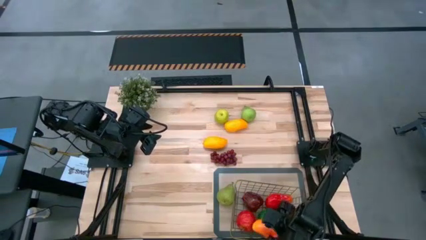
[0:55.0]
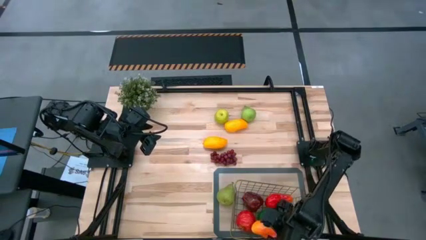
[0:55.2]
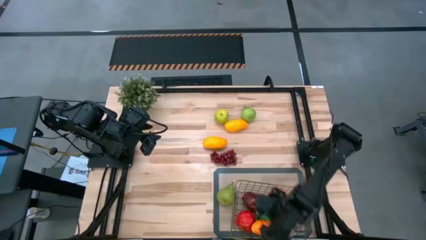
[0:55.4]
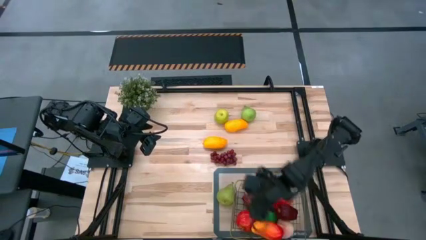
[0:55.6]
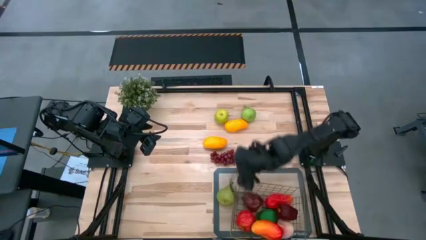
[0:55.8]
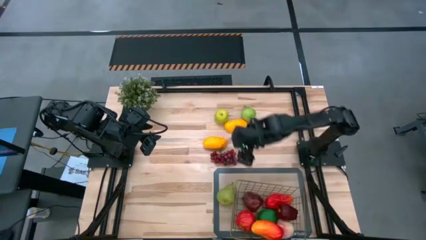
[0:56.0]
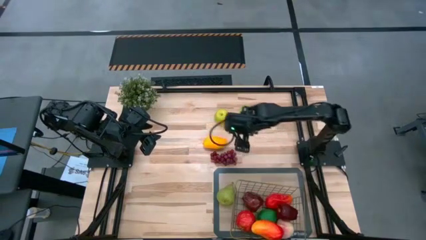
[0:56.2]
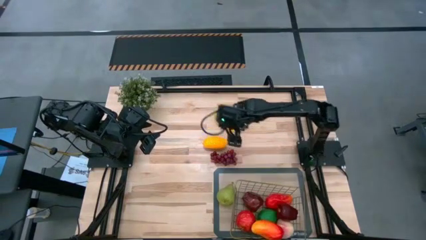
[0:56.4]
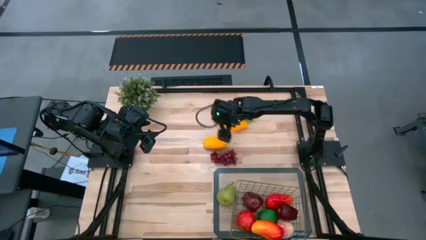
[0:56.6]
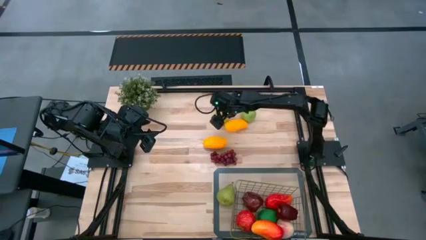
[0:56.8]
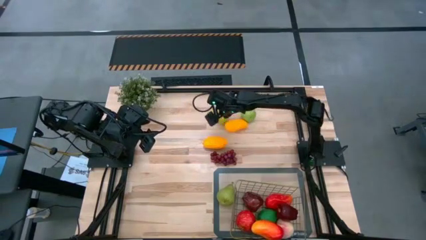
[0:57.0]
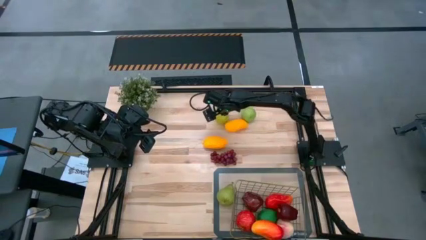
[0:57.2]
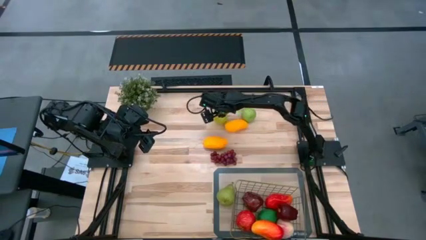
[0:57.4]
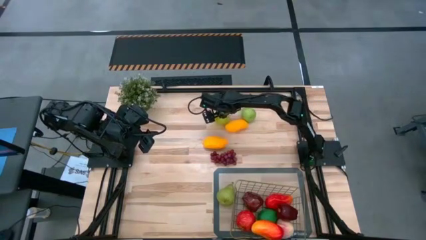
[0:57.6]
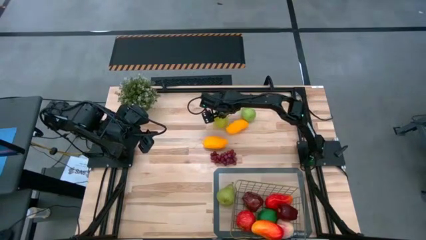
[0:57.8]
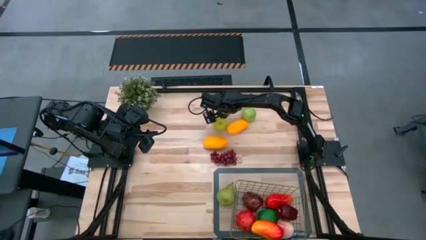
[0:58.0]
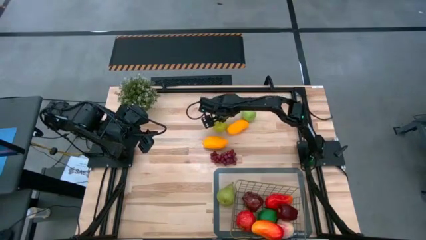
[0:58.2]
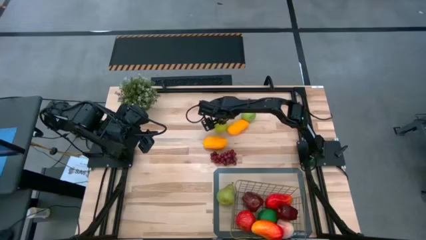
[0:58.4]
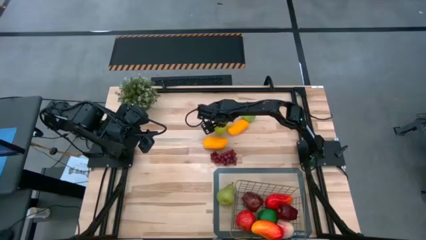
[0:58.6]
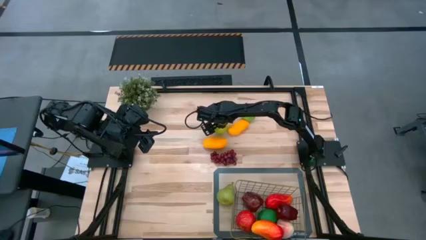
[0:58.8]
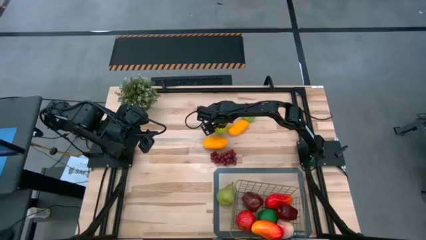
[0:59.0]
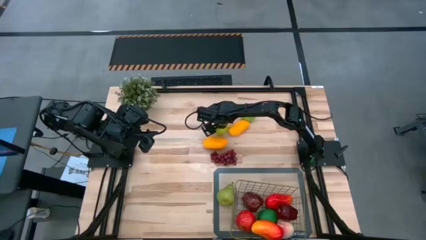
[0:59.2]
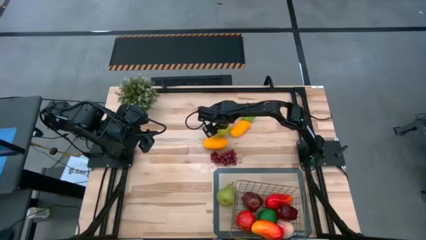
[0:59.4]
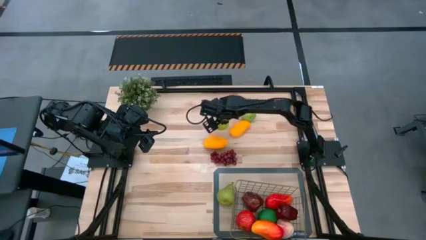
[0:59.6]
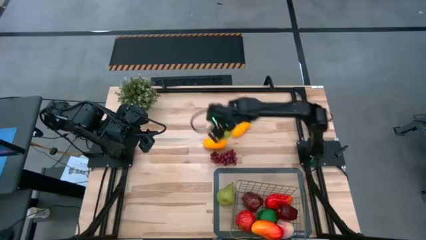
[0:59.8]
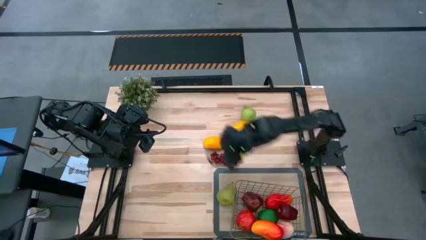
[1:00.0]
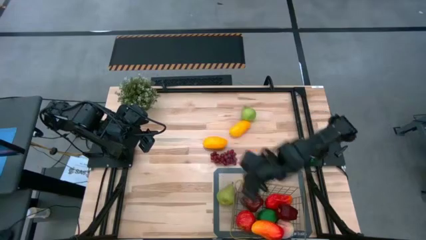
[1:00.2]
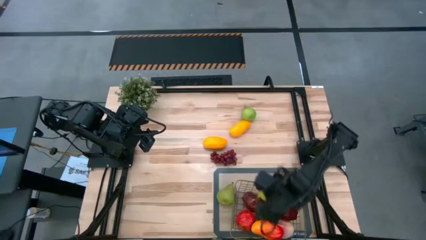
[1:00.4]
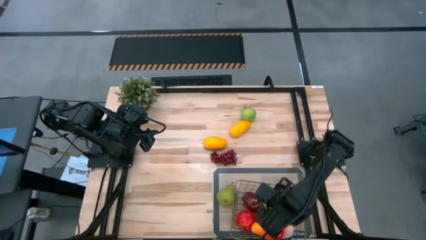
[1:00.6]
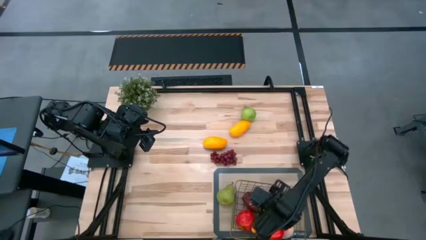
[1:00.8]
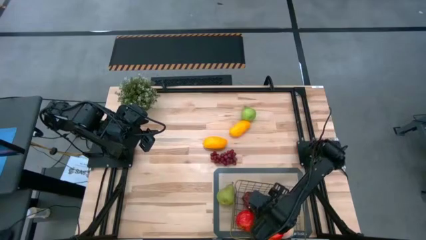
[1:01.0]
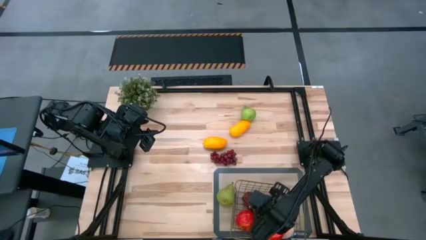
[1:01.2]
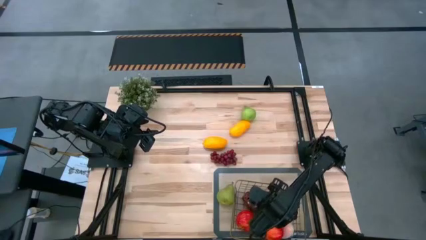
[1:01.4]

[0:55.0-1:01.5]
Task: Build produce basket
Put the green apple into the wire basket

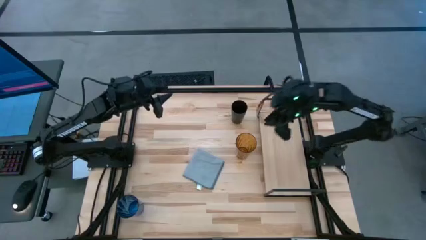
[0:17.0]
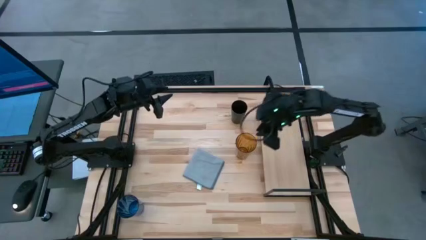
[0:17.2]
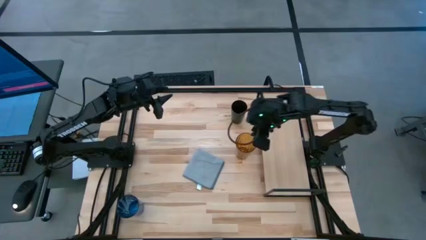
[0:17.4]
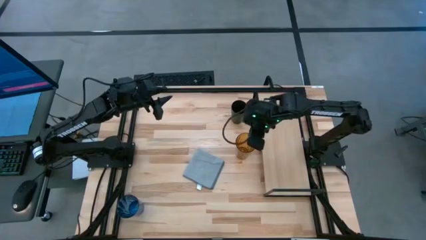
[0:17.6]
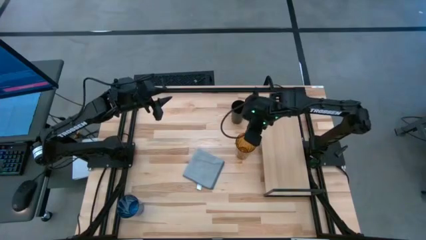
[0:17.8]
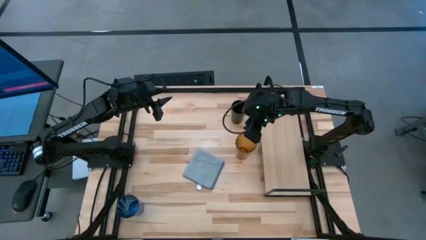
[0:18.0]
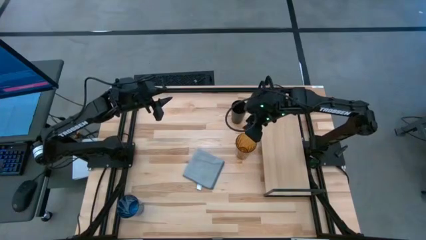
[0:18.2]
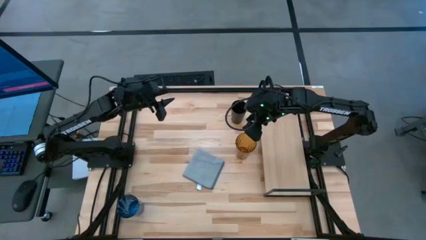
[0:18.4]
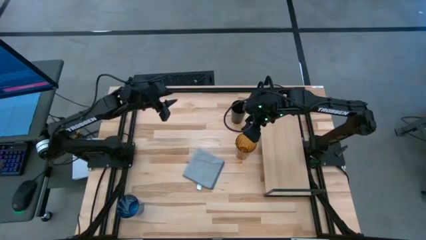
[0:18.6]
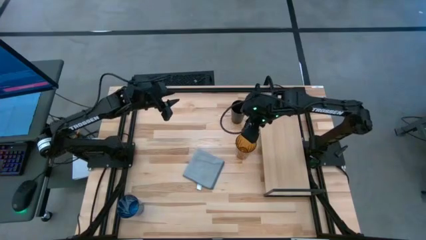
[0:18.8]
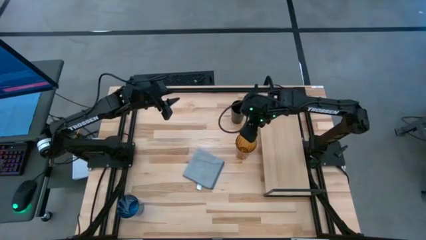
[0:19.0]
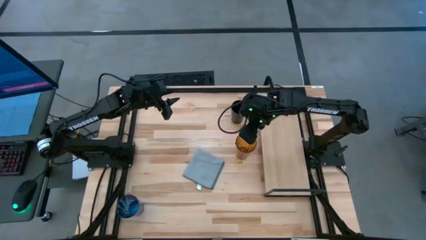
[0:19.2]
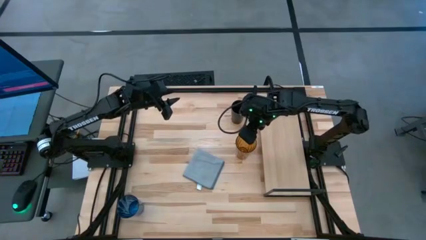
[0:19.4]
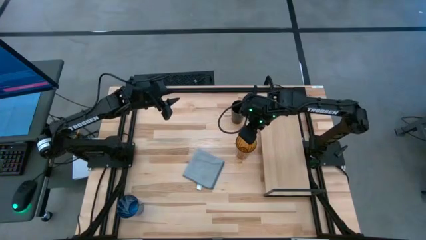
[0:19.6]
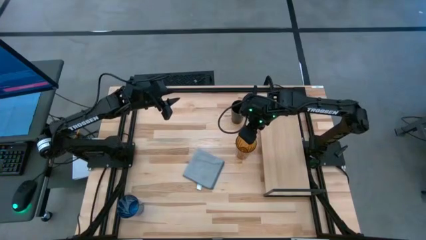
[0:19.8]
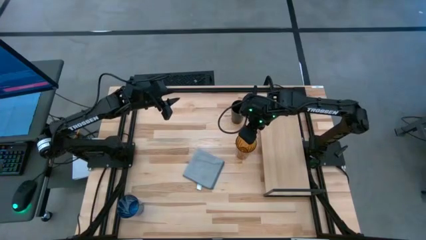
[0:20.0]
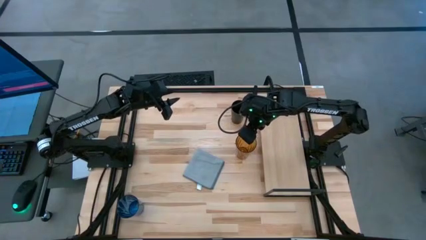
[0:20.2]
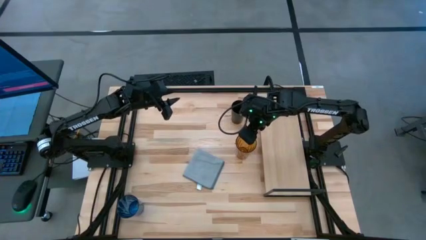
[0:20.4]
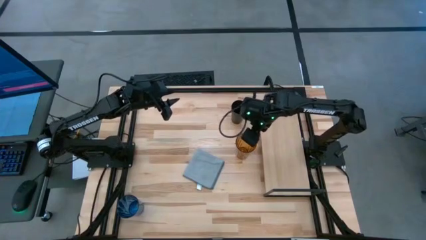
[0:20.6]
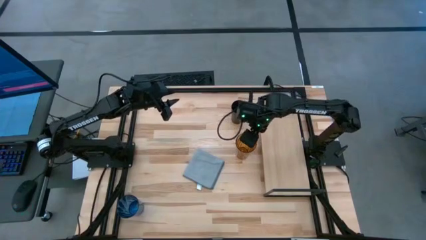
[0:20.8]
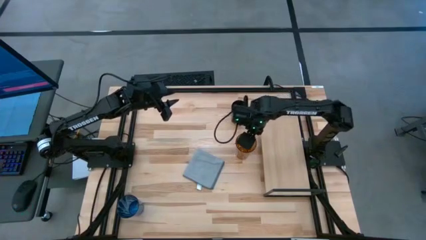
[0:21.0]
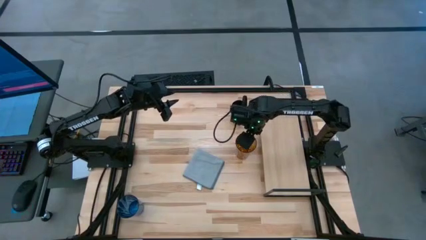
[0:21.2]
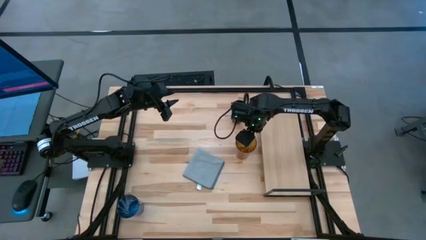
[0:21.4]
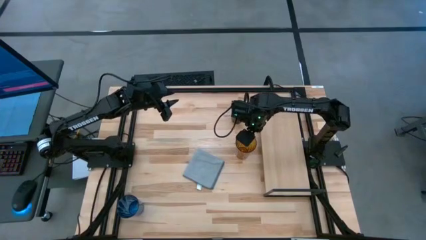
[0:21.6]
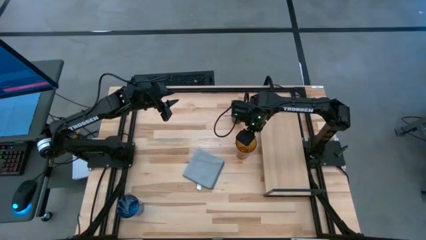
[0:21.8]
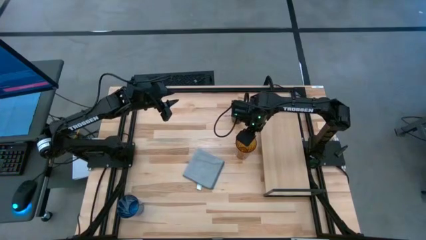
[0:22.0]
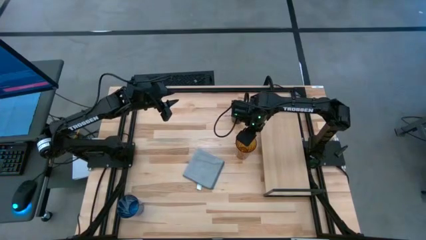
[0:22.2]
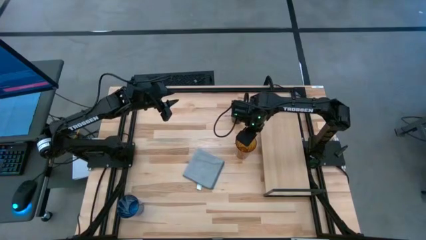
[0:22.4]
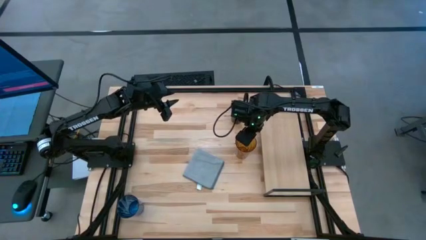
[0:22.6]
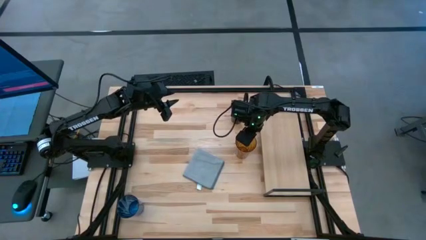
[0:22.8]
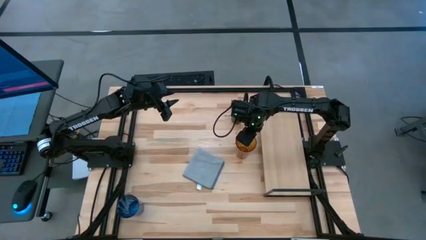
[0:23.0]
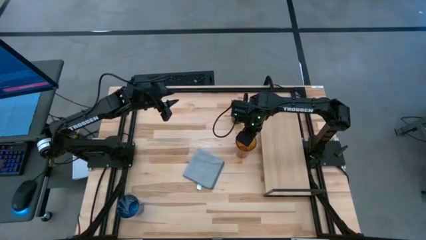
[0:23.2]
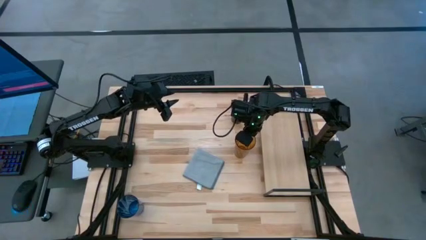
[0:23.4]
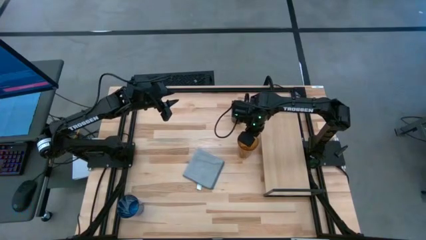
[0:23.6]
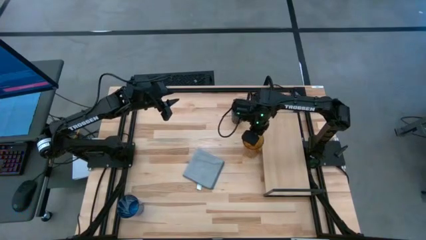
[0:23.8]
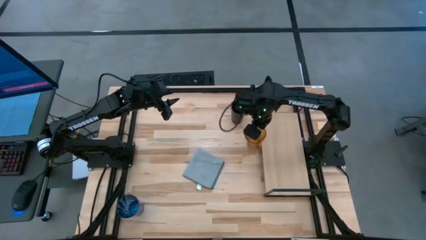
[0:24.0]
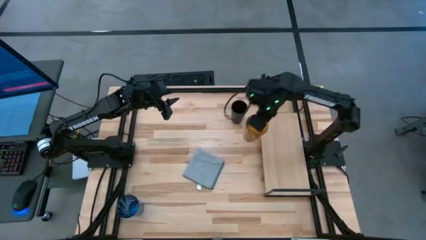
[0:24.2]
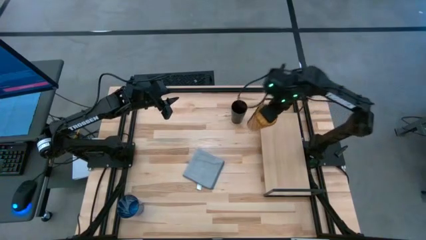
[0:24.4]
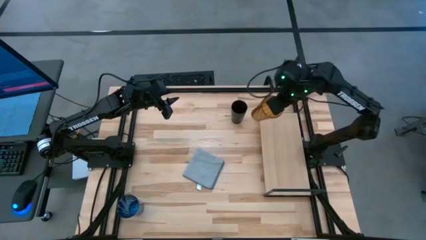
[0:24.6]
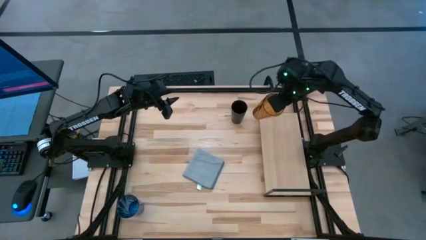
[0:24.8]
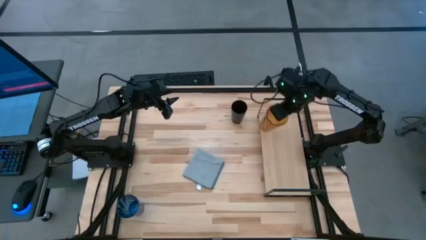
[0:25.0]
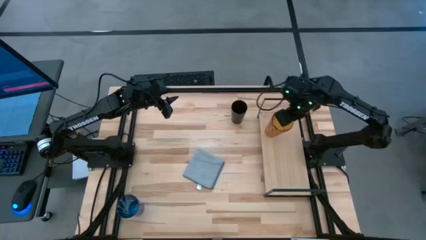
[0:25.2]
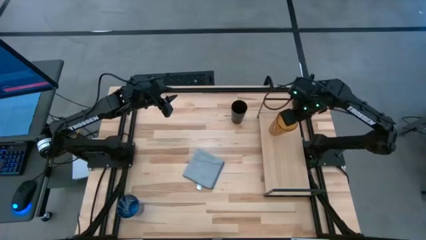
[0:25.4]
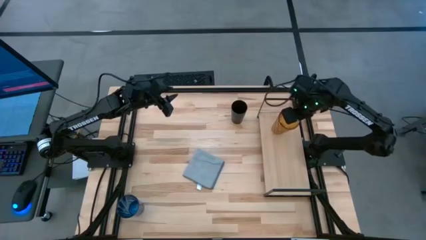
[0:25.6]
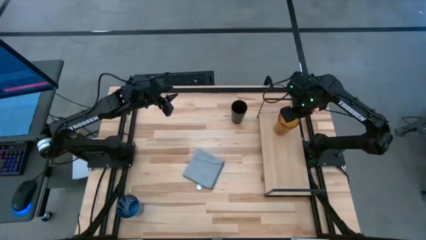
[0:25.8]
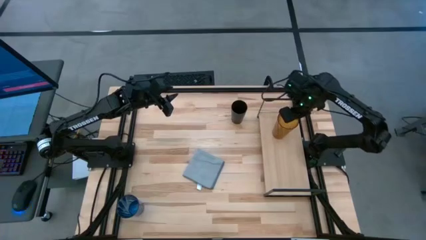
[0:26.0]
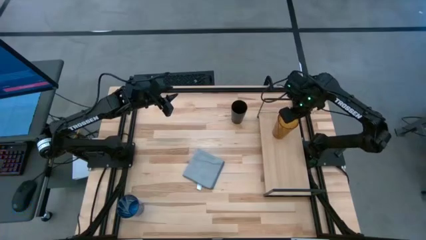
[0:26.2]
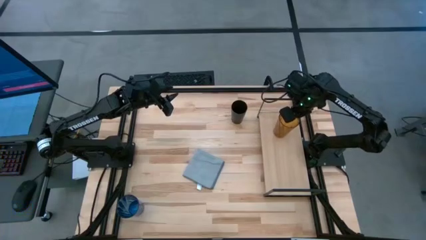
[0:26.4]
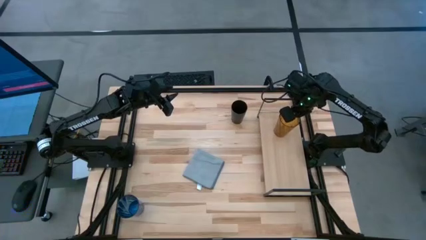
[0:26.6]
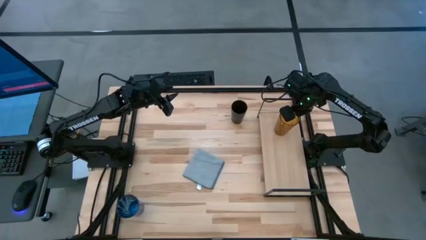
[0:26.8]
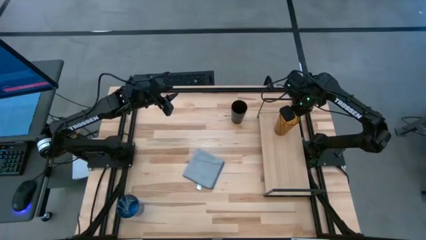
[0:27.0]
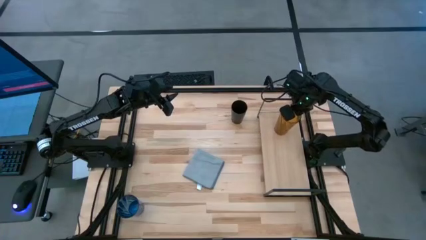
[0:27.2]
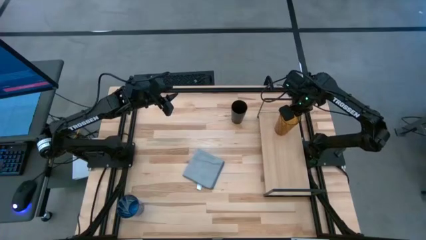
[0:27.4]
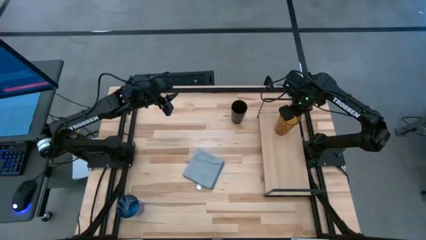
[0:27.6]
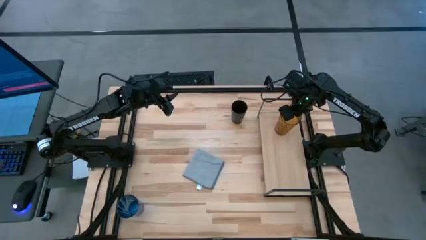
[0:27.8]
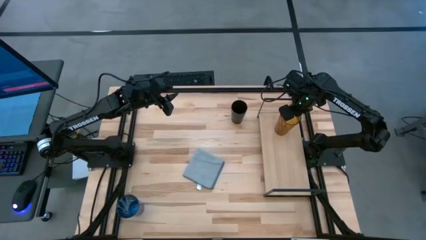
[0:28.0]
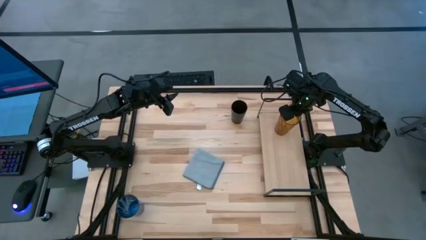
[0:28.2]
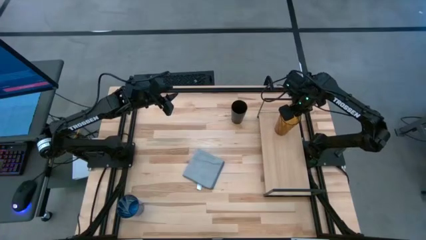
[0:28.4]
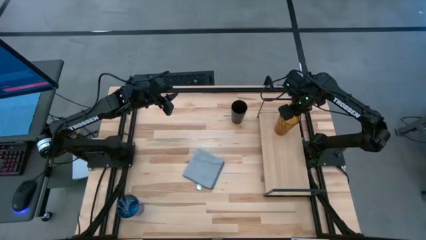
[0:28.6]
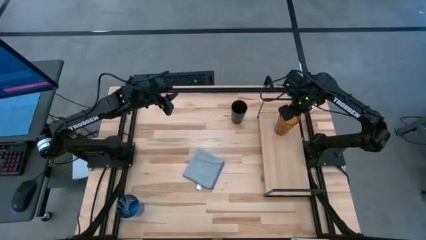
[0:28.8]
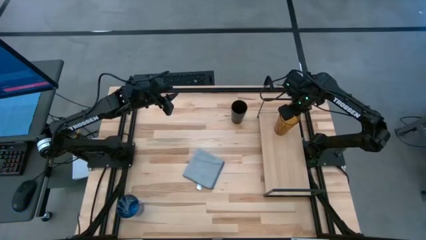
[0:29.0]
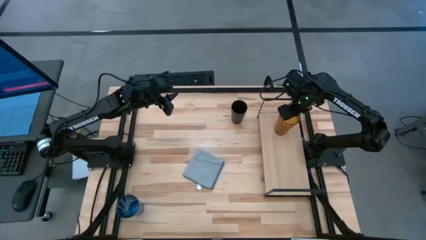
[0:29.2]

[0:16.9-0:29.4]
Task: Stack small to large cups/mugs on shelf
Put the brown cup on the shelf
